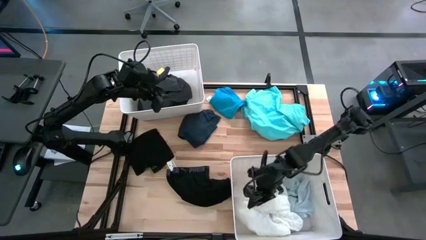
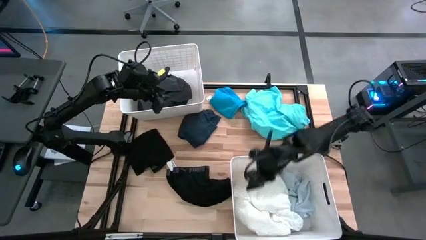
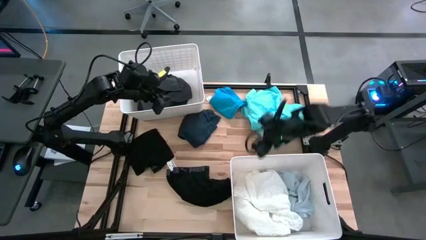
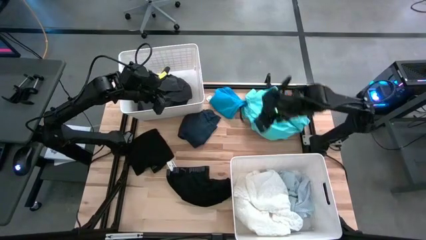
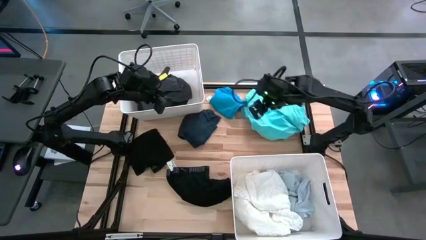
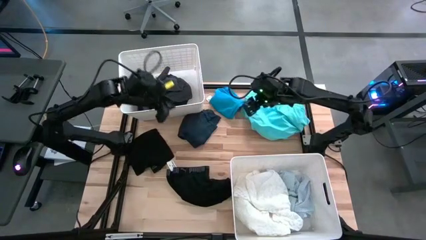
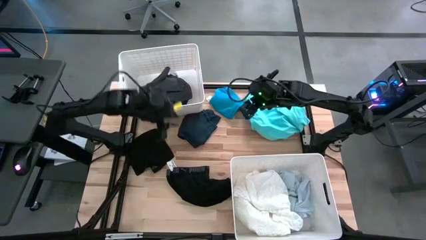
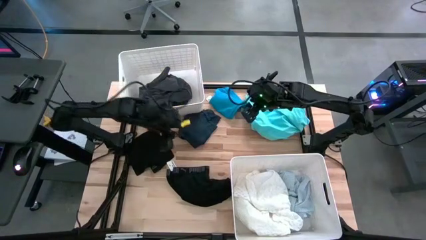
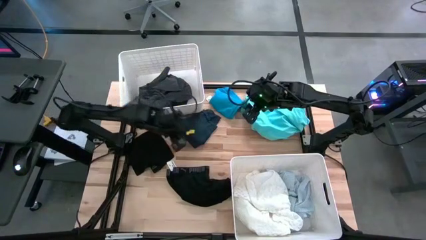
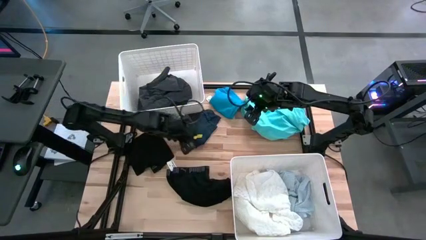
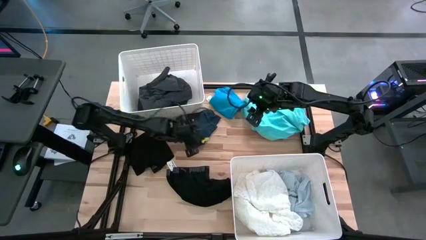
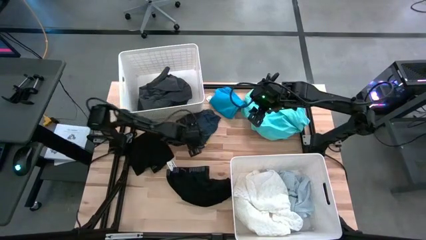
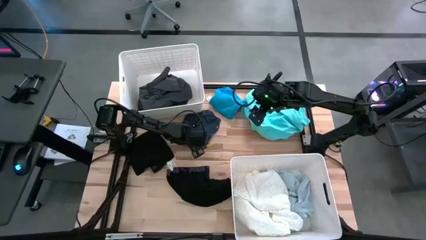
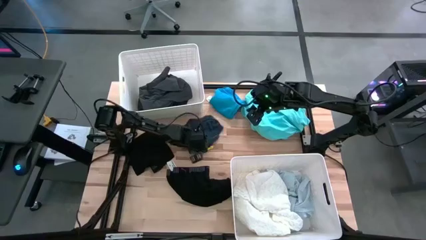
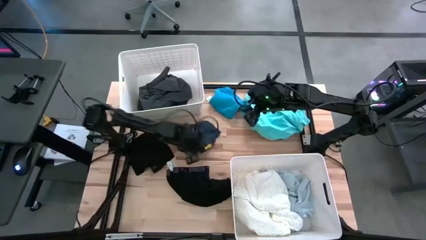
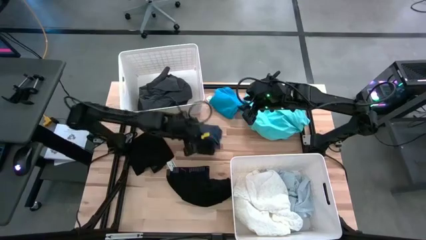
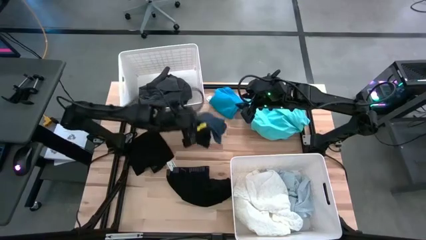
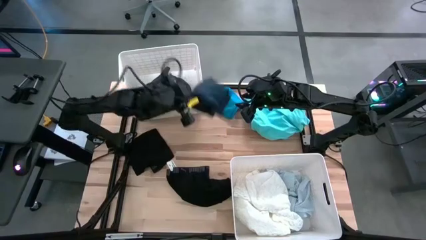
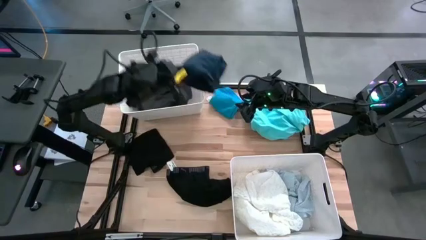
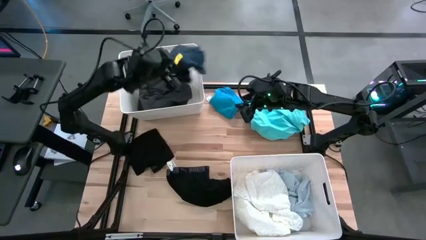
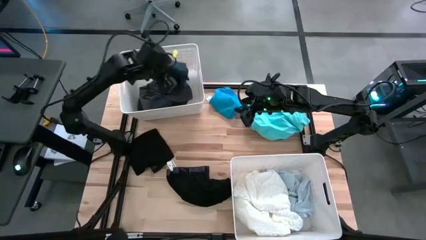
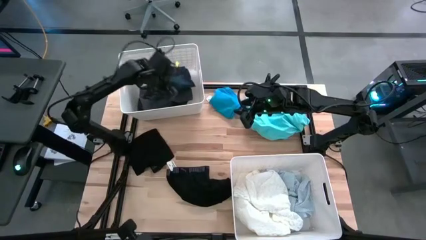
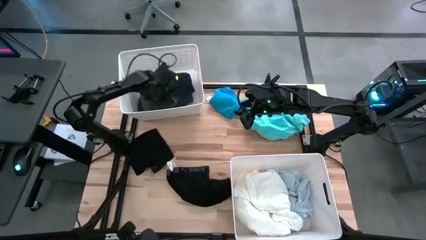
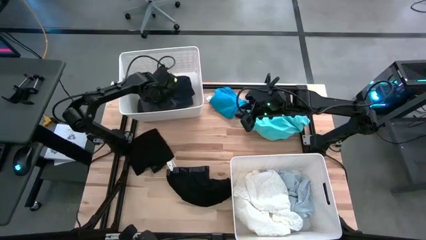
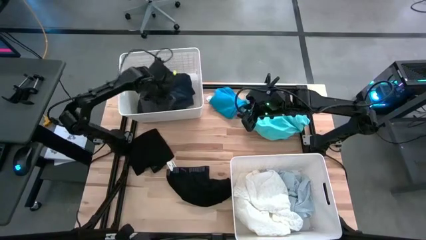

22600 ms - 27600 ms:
Task: Sort clothes
Put the gray short into the top white bin

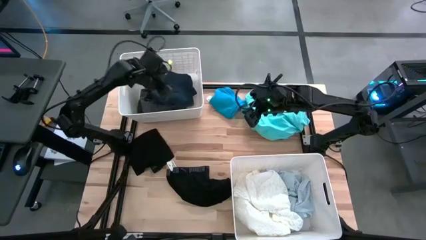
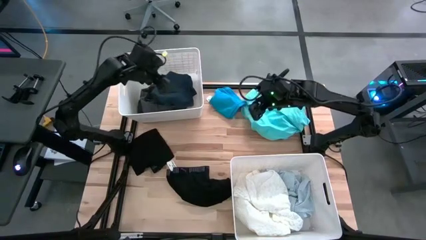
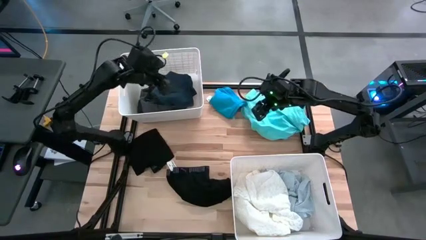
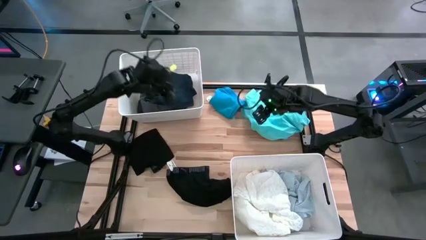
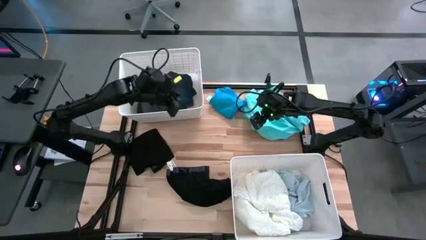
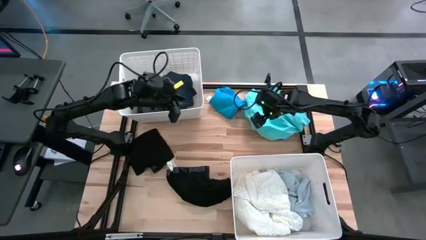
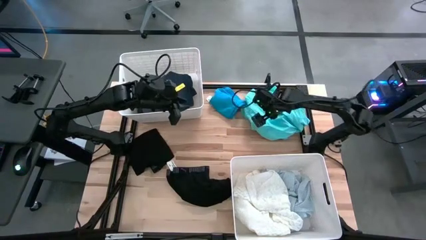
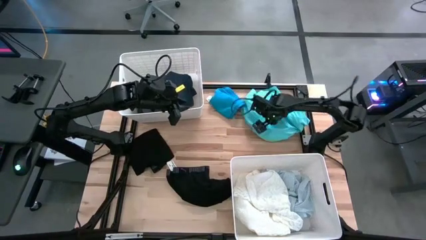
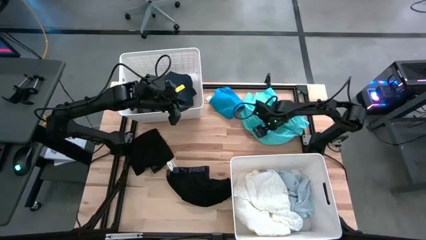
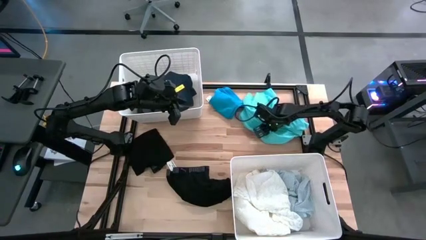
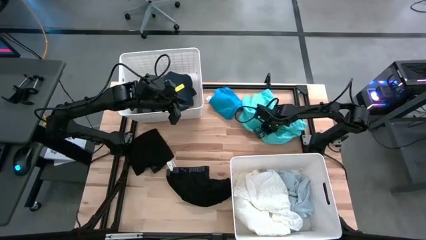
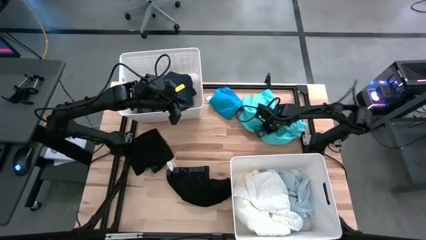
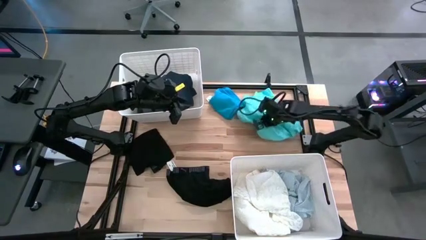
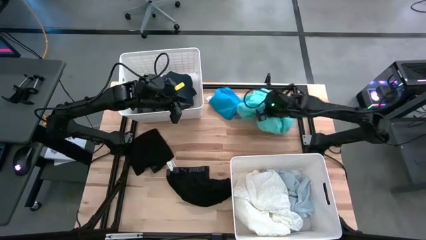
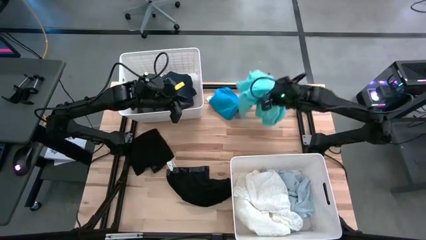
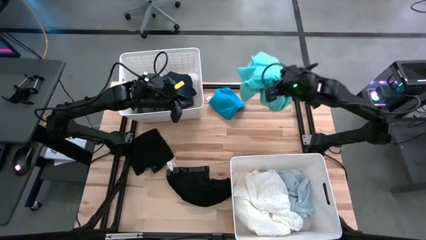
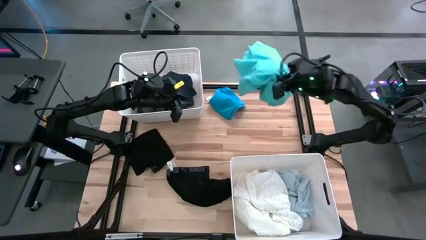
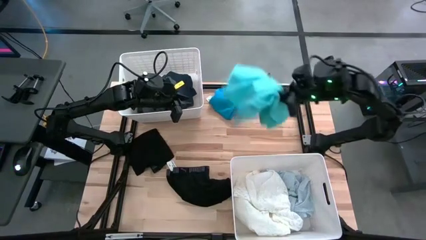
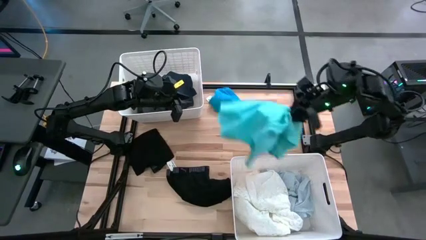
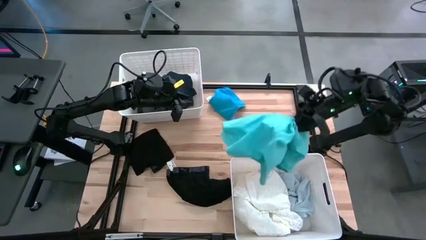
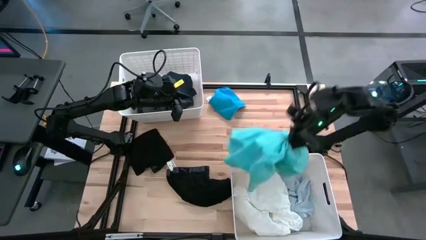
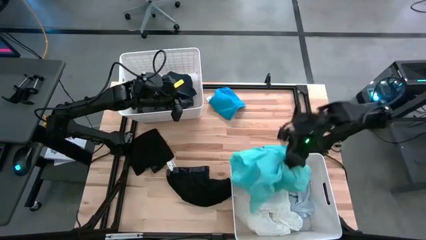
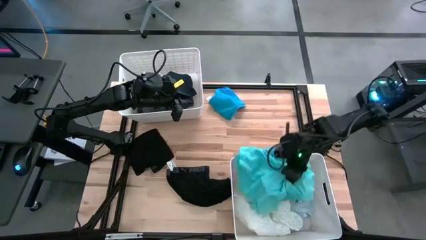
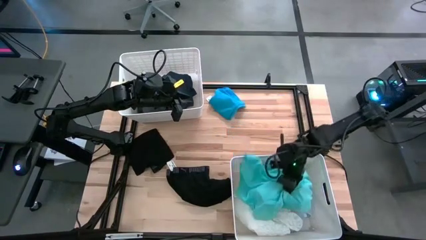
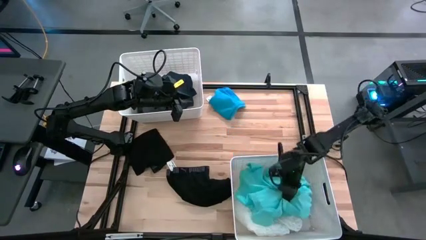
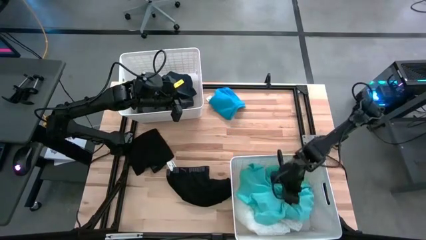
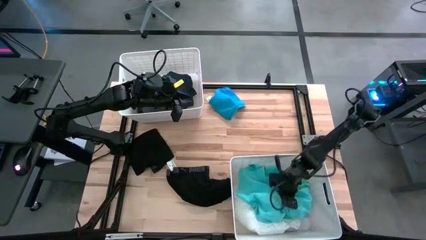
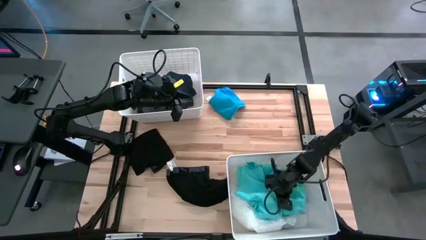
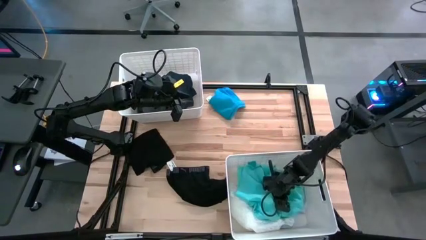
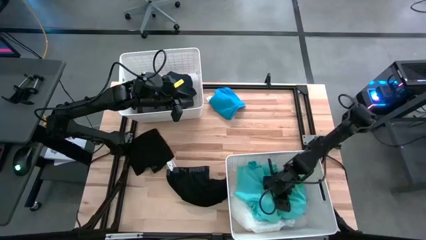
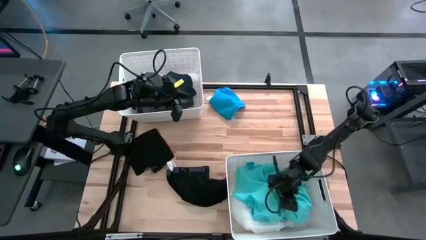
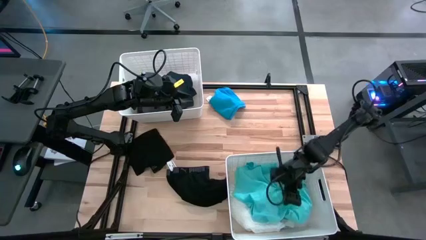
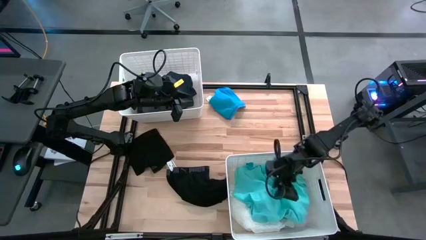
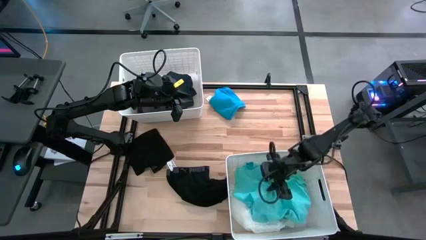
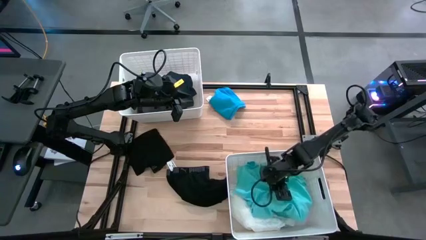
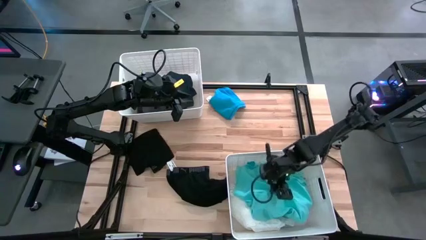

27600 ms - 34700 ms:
Put the light blue shirt into the bottom white bin

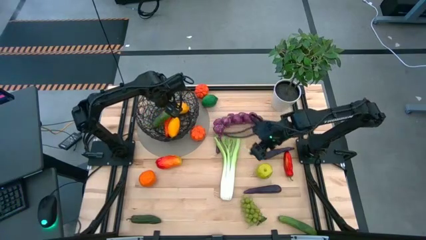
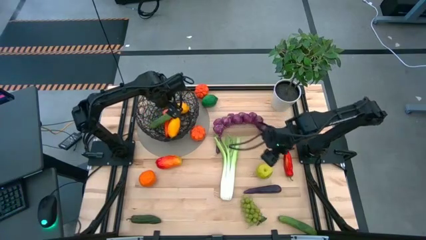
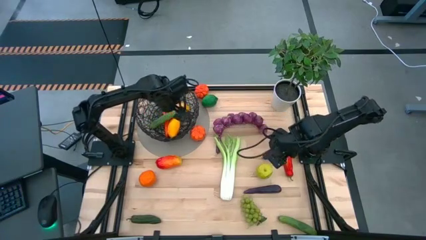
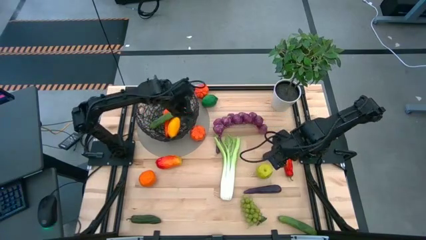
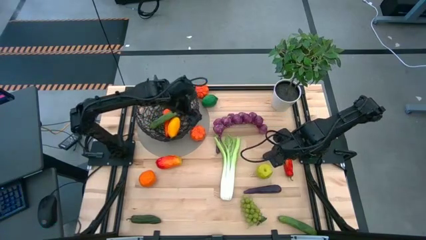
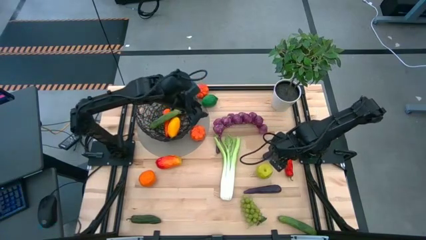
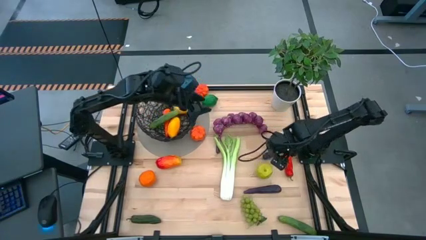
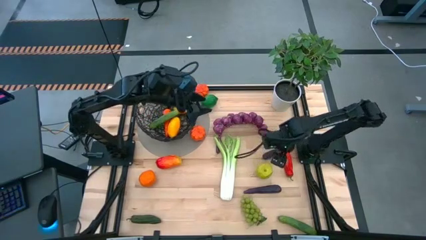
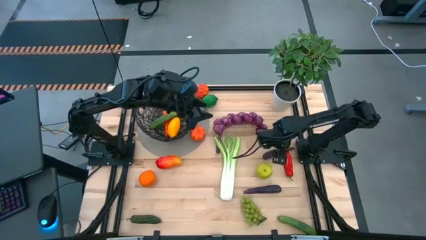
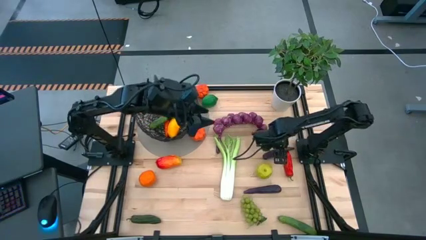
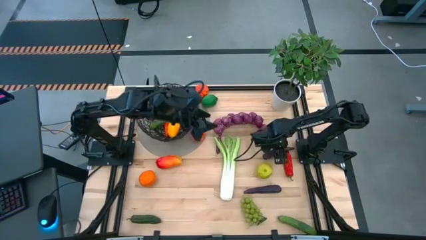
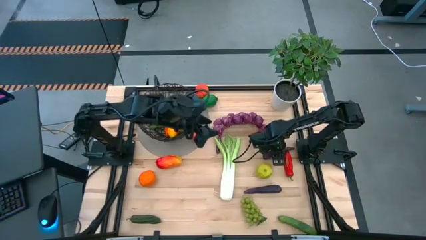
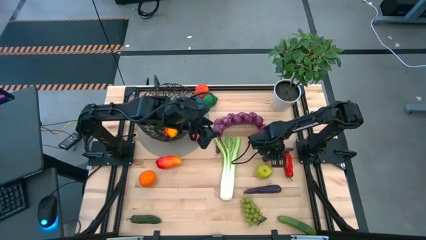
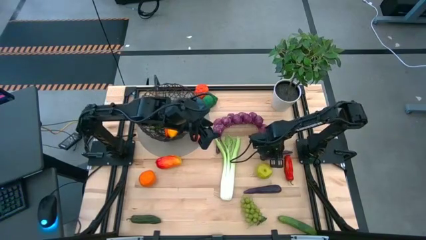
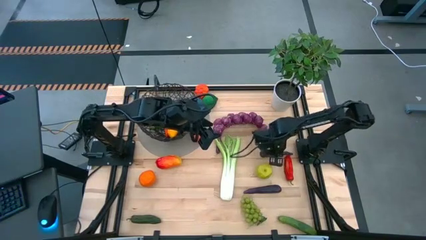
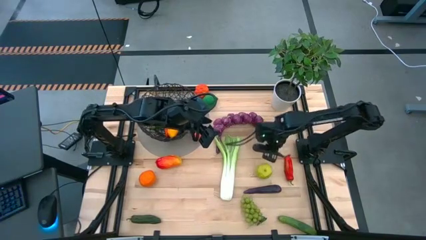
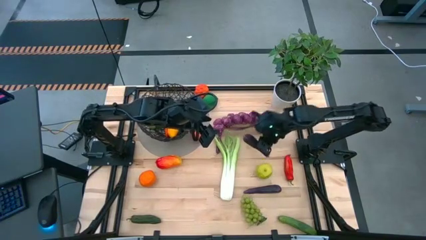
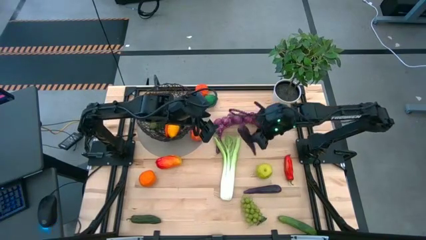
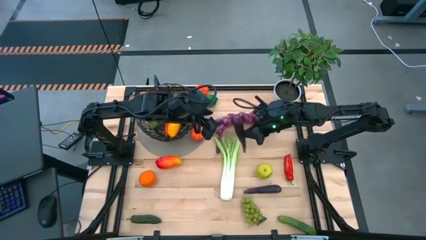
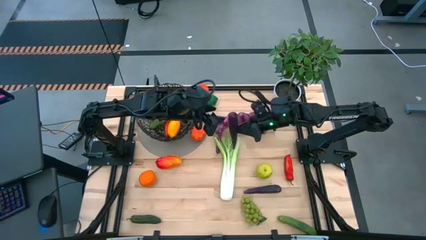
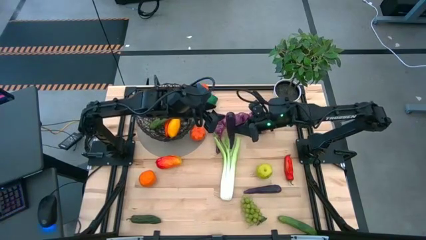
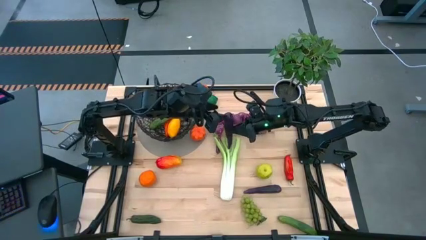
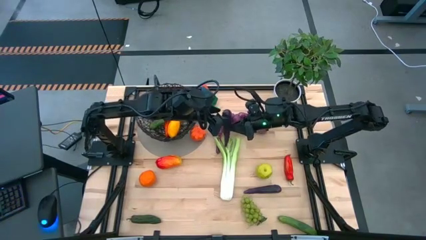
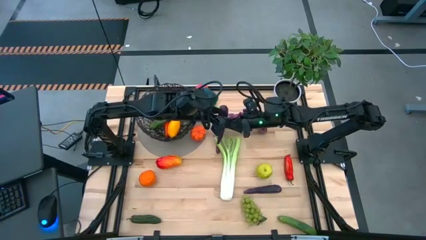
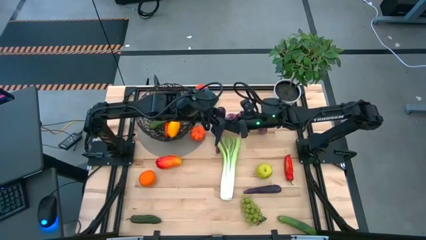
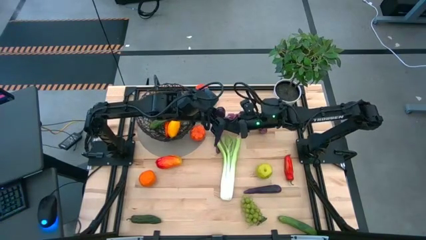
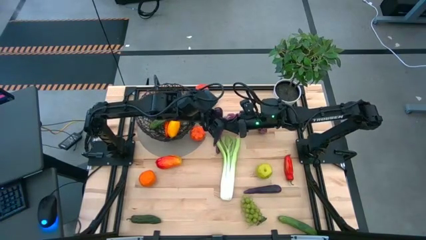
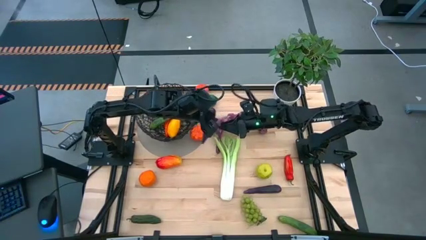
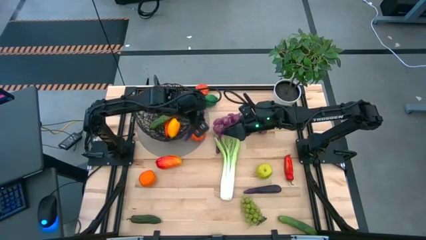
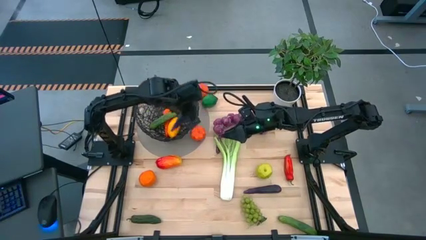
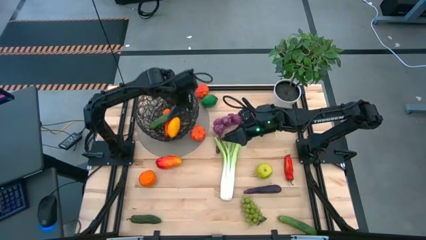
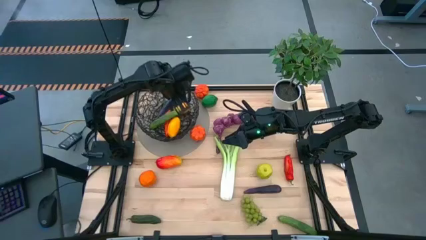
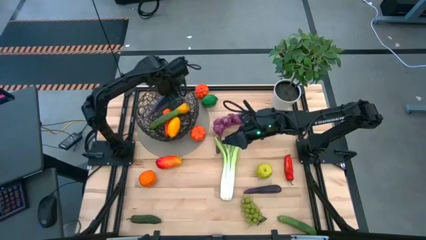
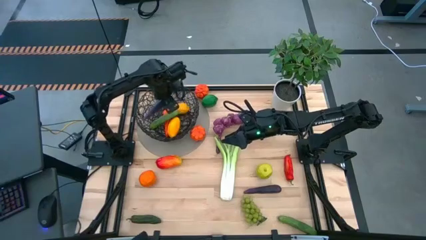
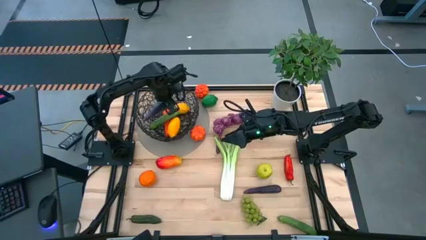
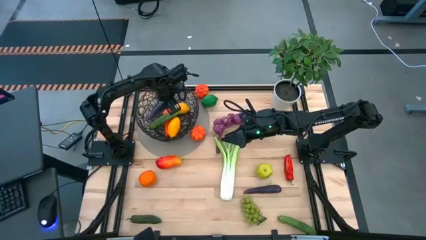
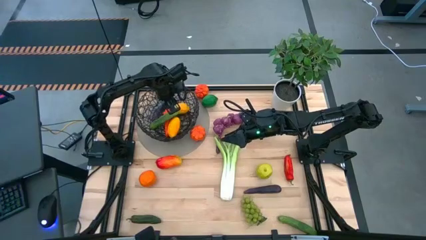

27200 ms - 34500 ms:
Task: Build produce basket
Put the violet eggplant into the wire basket
